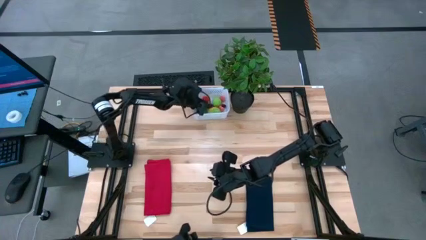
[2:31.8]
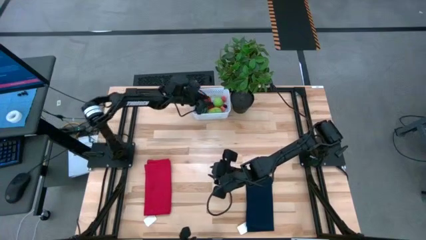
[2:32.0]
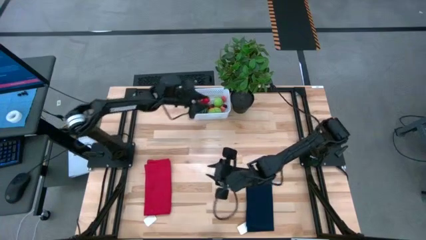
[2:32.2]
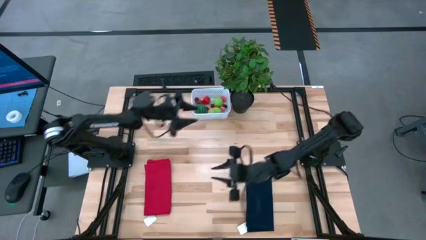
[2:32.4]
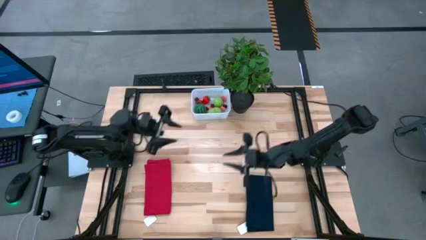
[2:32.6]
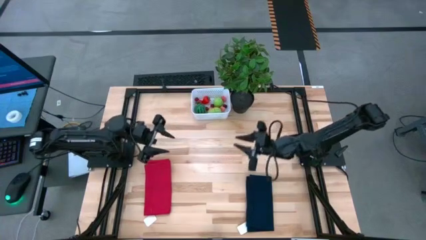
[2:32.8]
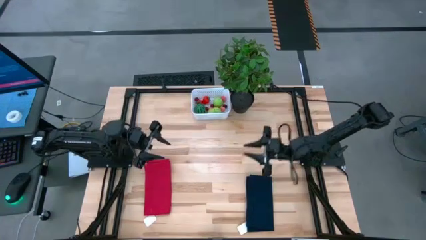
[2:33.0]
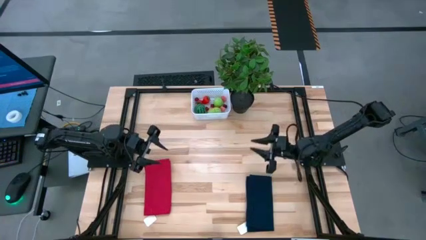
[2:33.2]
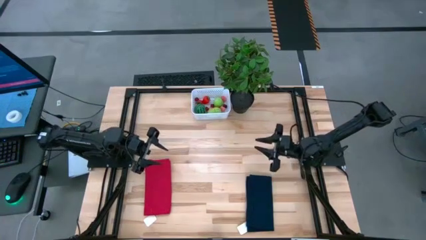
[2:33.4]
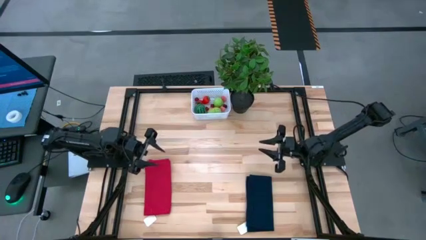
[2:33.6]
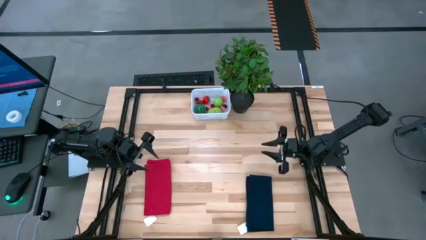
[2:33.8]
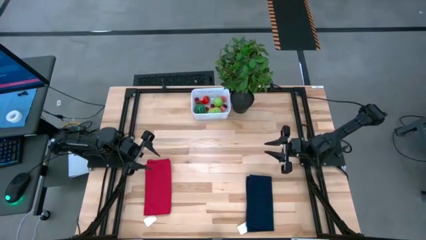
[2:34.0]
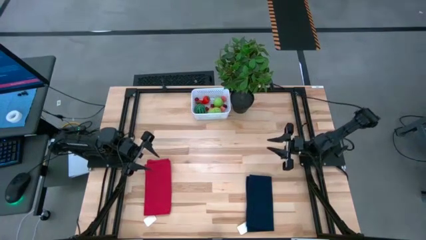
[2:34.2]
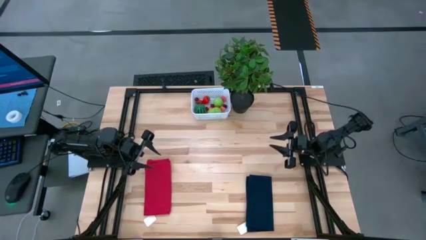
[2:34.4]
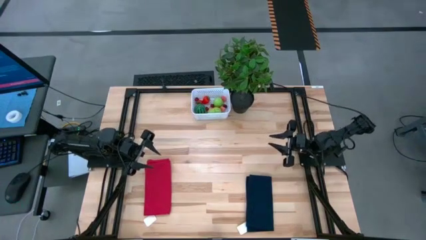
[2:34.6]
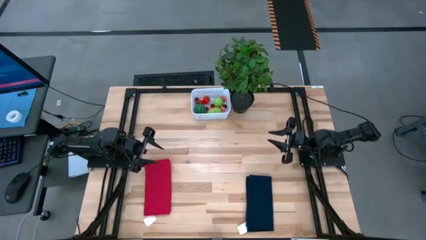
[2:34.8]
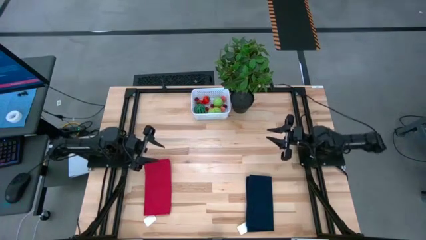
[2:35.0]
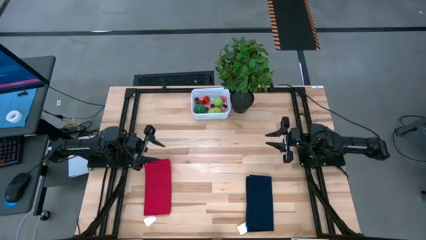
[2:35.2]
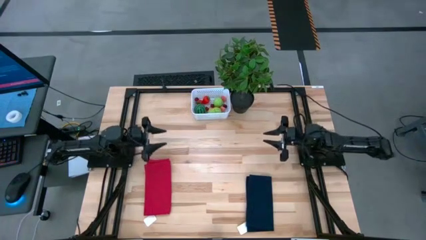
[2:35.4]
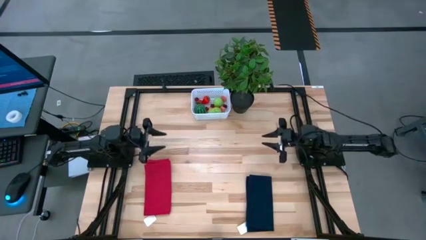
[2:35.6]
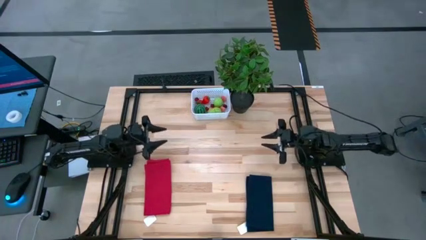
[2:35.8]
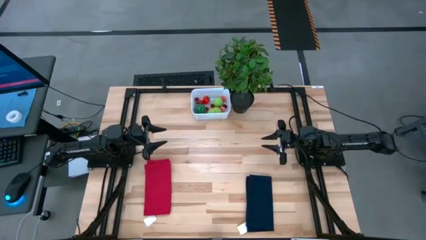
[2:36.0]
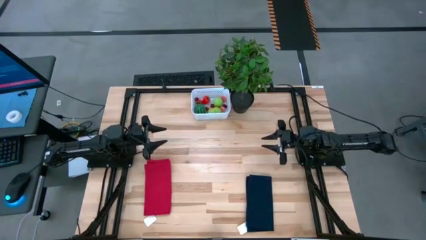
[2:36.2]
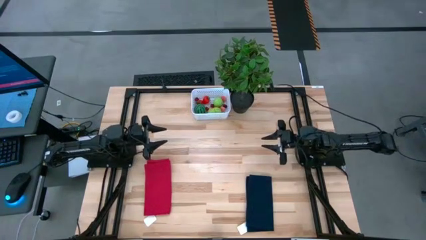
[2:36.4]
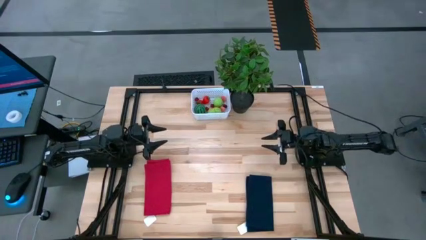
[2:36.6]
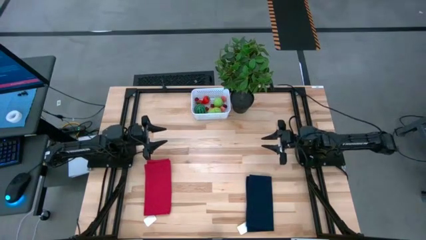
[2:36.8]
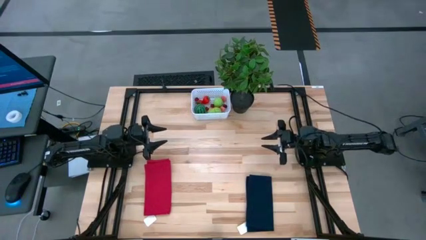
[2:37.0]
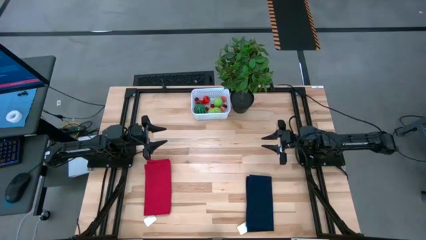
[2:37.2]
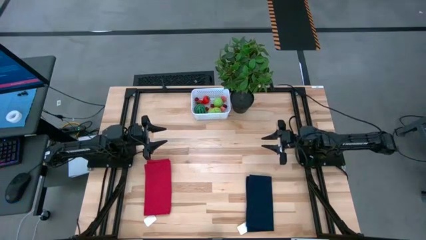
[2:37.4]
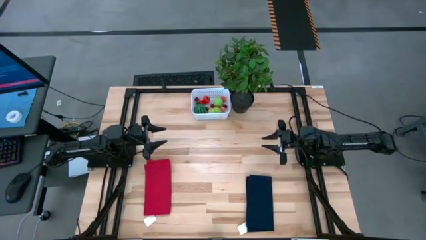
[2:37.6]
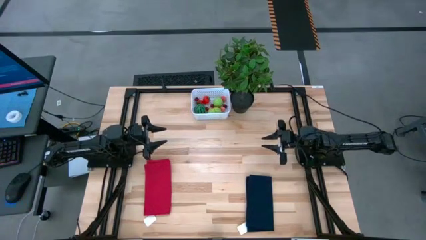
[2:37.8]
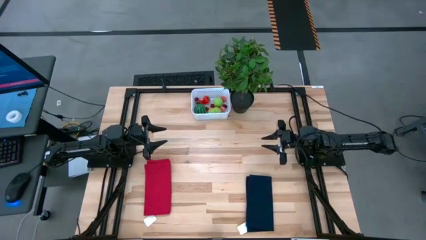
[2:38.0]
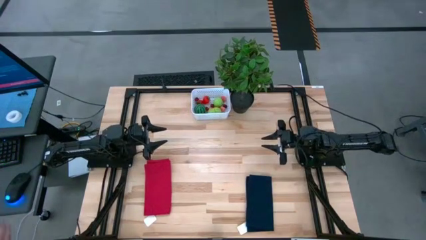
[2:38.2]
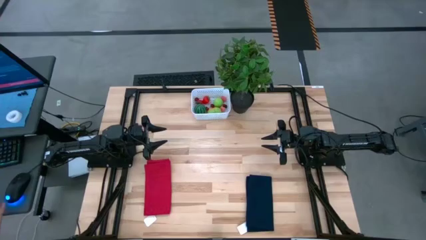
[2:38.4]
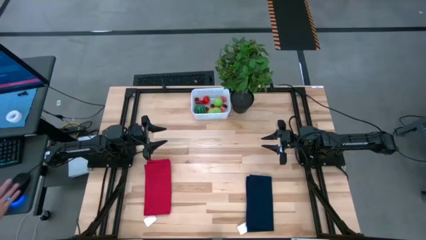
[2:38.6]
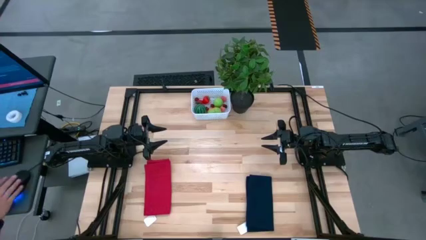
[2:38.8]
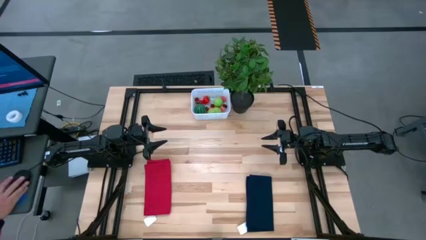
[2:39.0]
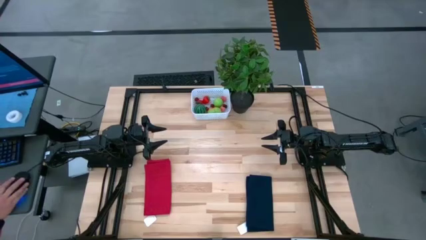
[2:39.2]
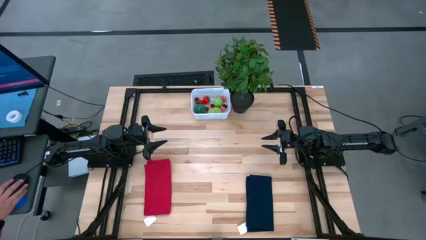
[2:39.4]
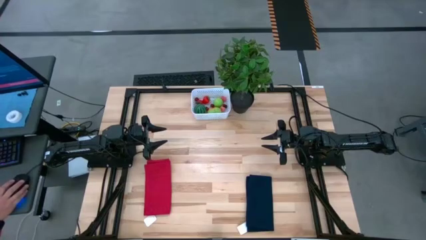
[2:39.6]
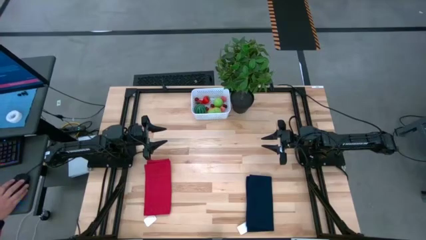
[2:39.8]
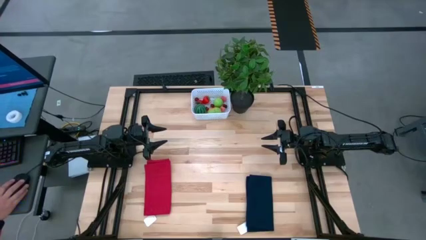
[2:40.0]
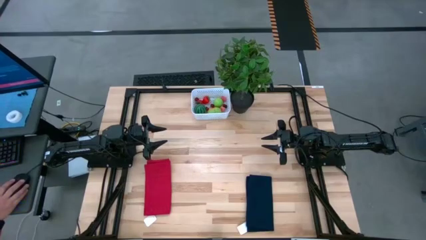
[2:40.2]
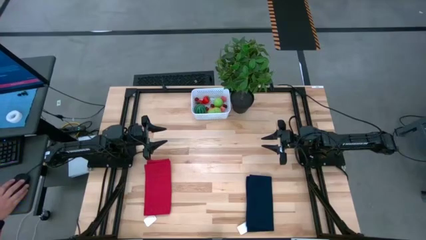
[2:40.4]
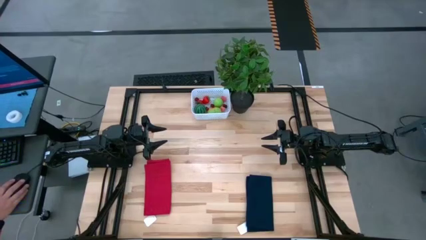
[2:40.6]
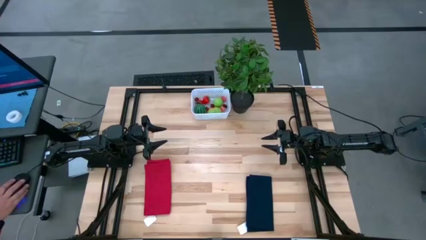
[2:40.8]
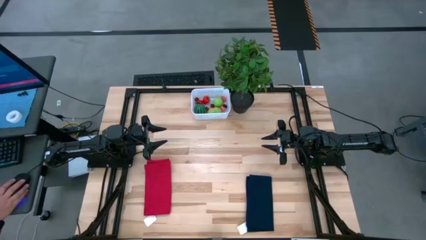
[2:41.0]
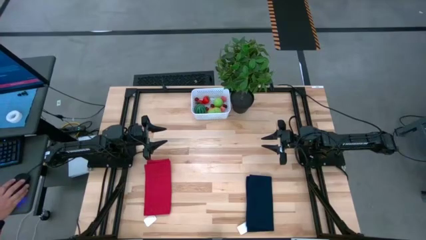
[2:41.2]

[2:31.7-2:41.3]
Task: Pick and placing Produce into tupperware
Return to Home Position

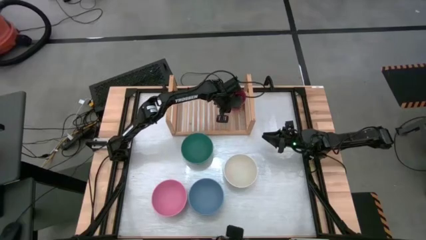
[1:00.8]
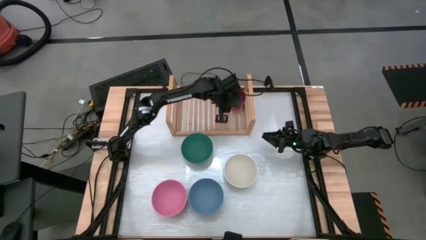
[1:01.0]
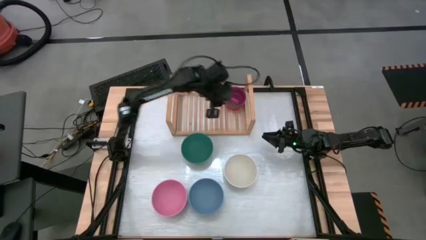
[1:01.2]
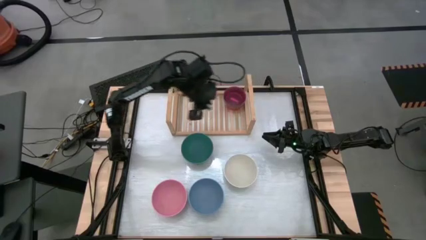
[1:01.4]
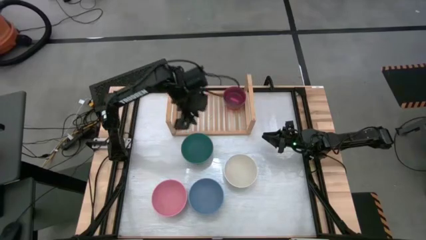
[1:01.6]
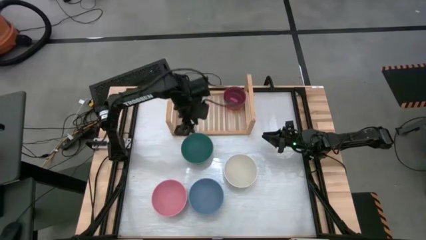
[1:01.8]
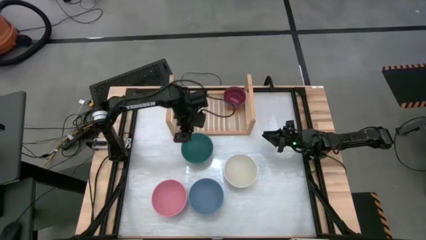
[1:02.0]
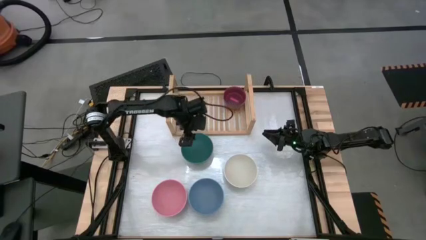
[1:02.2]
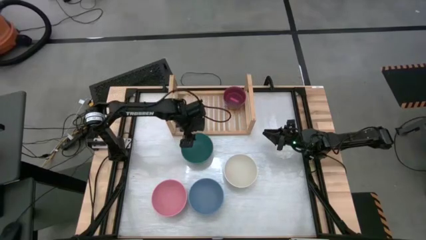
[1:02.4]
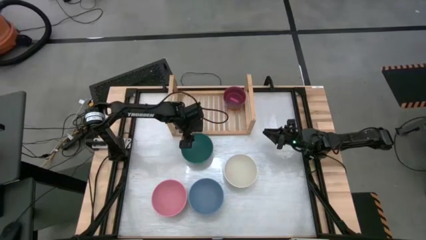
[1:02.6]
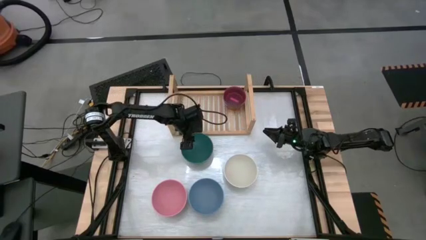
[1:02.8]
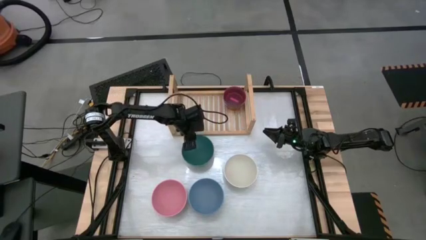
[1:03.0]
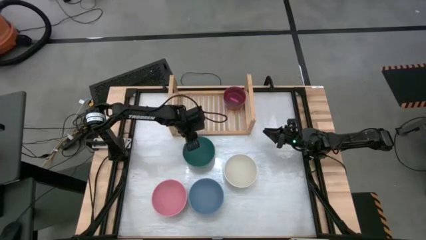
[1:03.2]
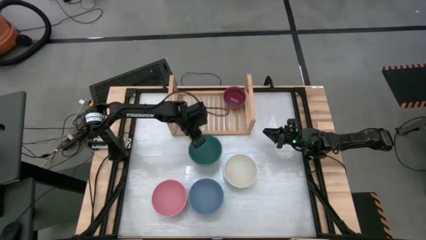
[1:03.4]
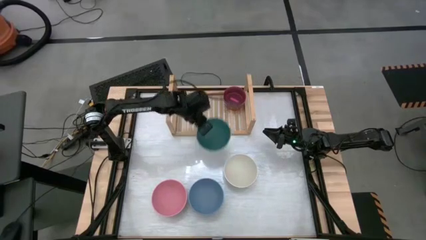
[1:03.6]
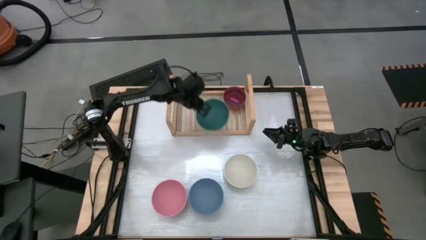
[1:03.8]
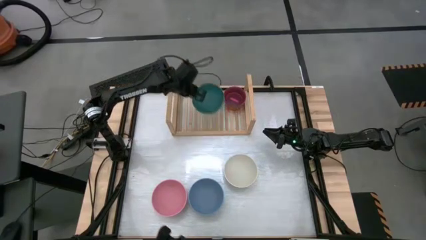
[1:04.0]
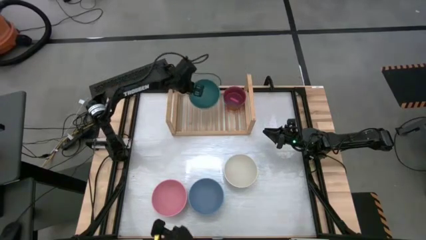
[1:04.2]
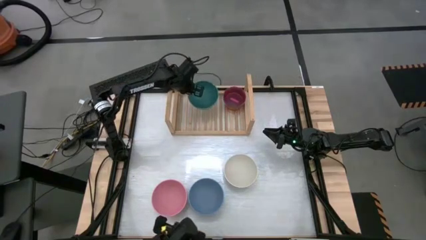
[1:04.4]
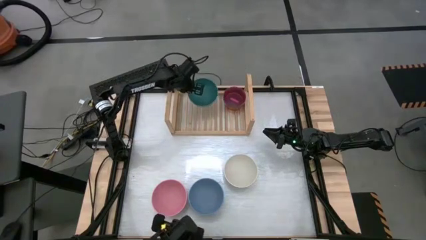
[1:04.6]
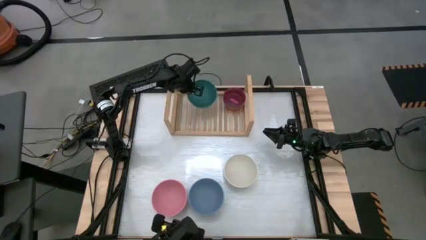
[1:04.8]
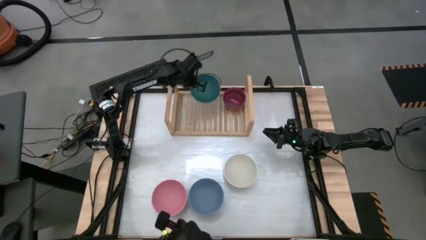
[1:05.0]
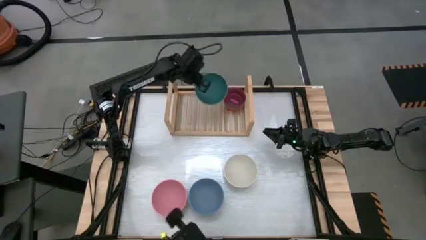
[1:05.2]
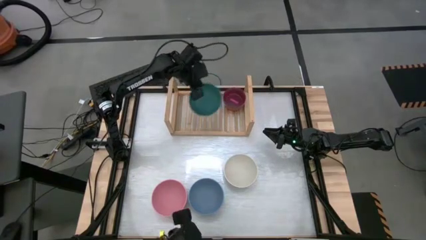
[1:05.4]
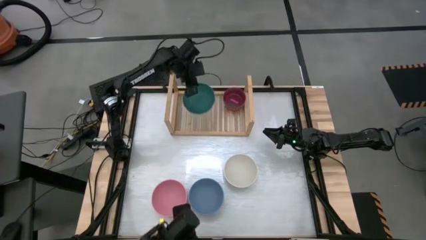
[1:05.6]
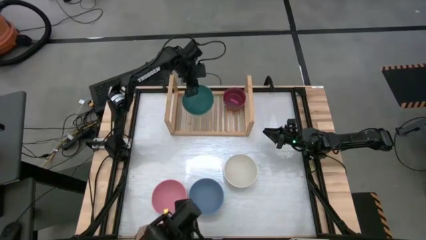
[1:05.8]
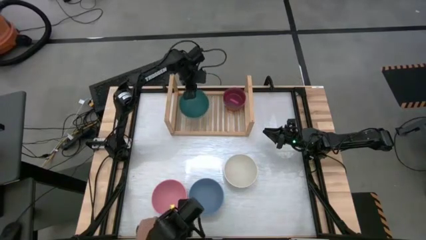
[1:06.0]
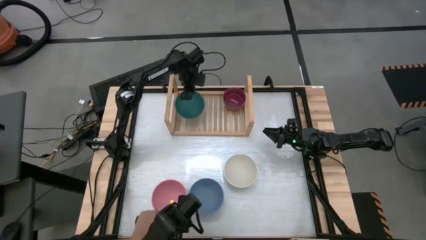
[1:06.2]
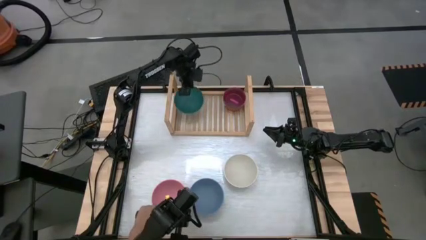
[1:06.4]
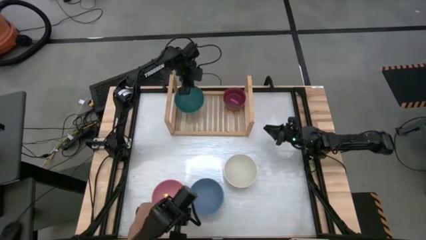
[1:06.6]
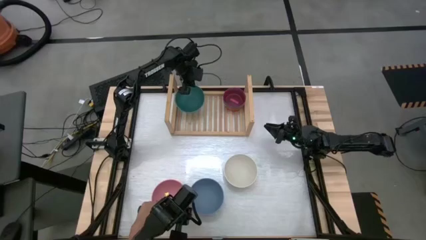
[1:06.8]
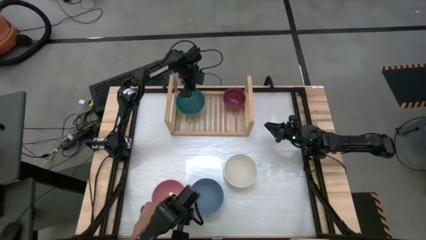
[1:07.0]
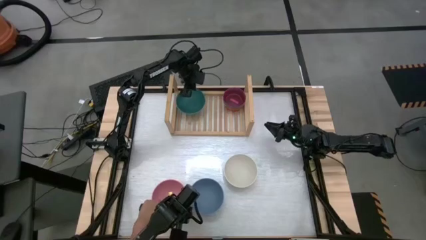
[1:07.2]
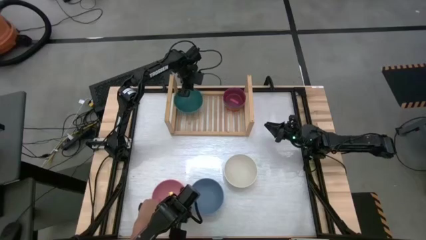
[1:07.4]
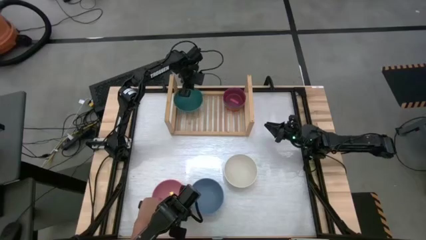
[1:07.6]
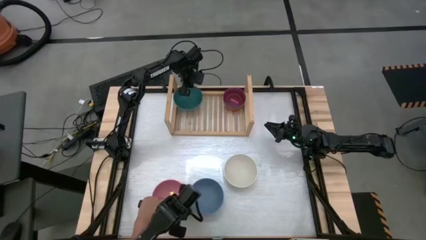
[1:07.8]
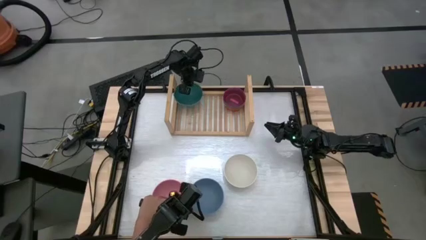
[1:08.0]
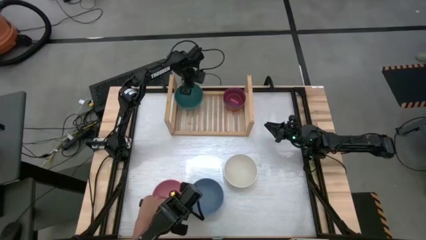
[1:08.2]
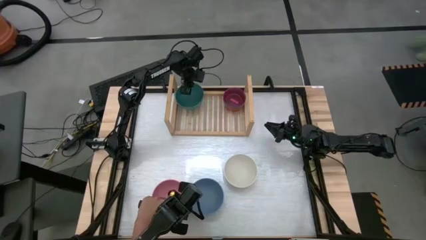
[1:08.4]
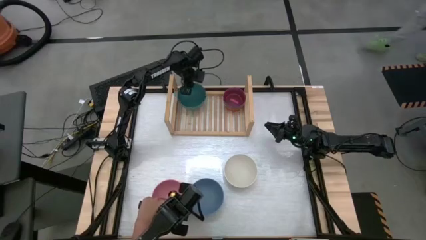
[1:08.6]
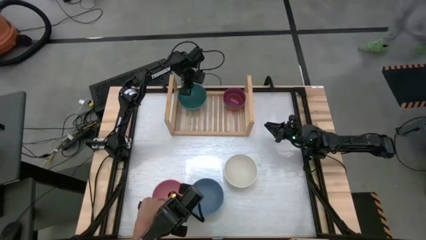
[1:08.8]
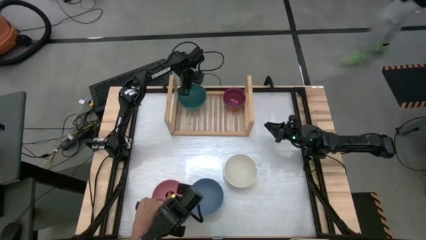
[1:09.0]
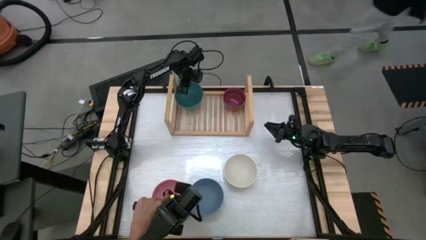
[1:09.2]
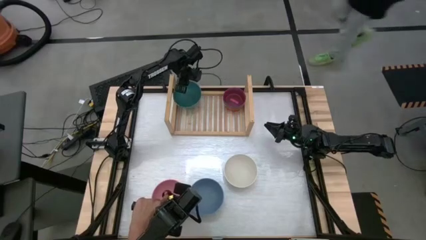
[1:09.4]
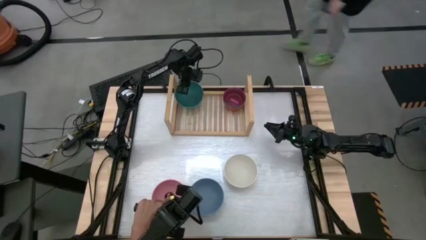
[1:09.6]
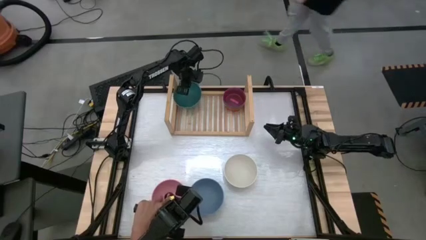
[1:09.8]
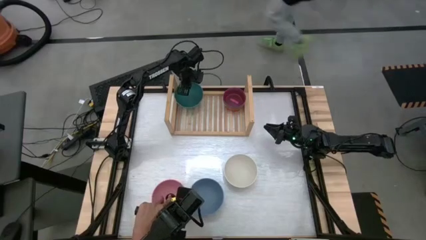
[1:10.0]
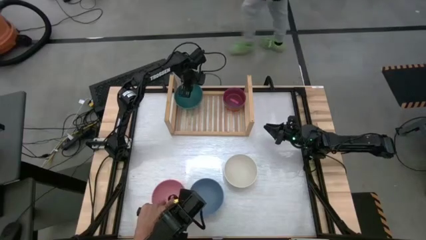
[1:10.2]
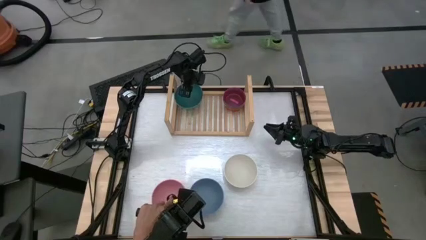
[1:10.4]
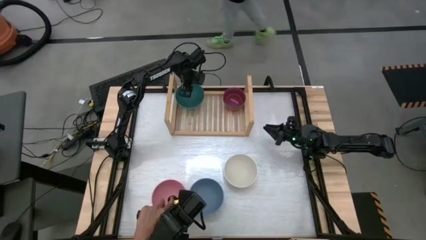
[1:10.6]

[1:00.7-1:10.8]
Task: Place and stack bowls onto a shelf
Put the large green bowl on the shelf
